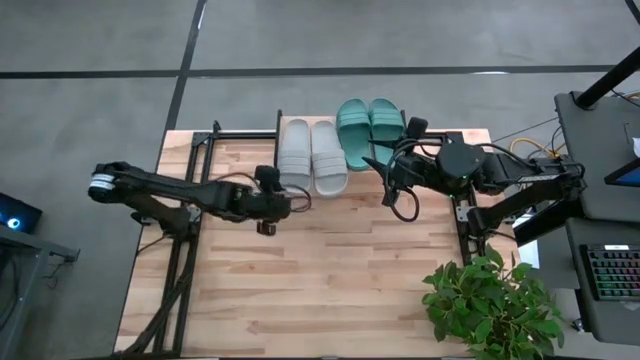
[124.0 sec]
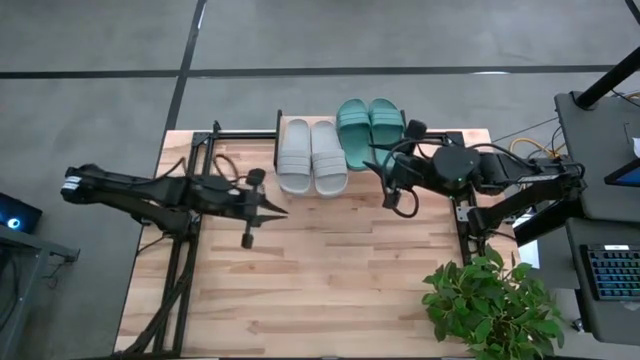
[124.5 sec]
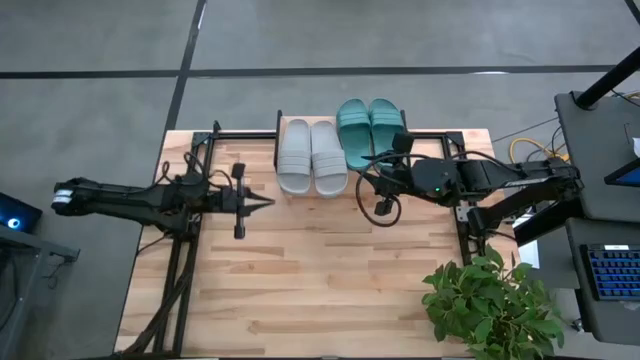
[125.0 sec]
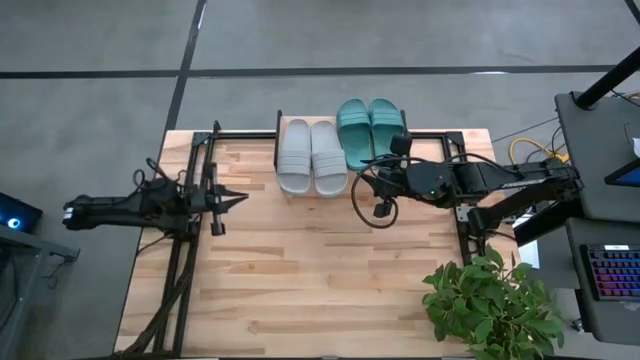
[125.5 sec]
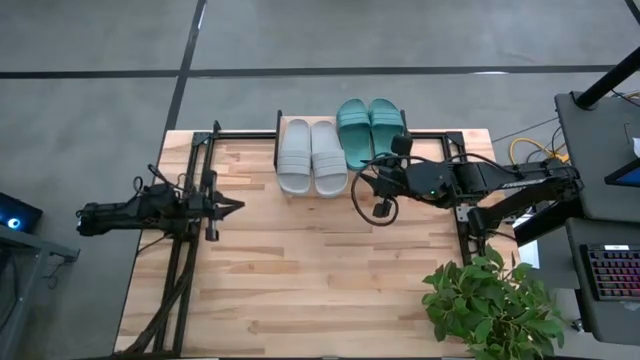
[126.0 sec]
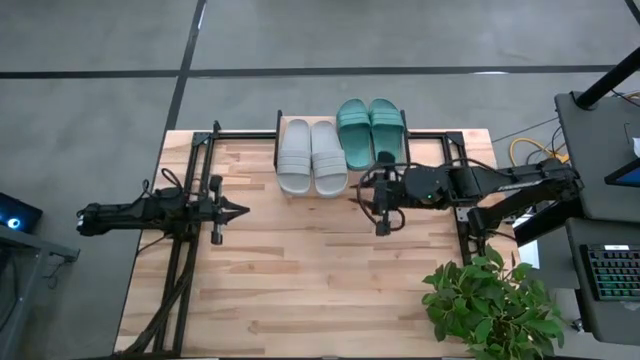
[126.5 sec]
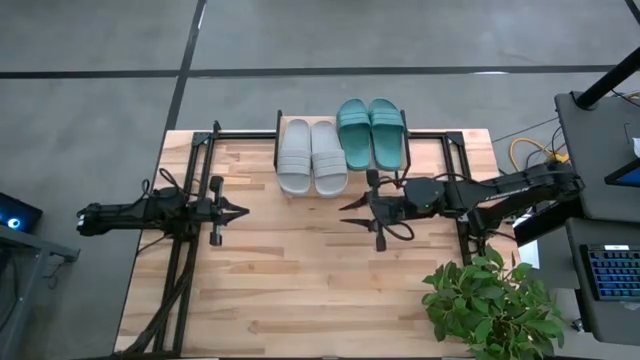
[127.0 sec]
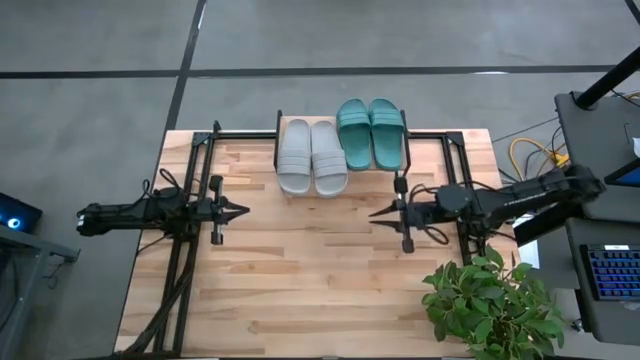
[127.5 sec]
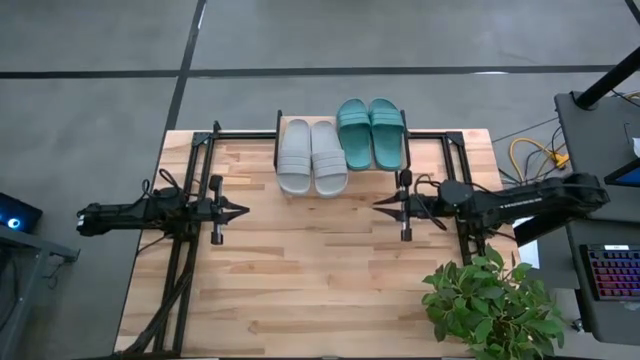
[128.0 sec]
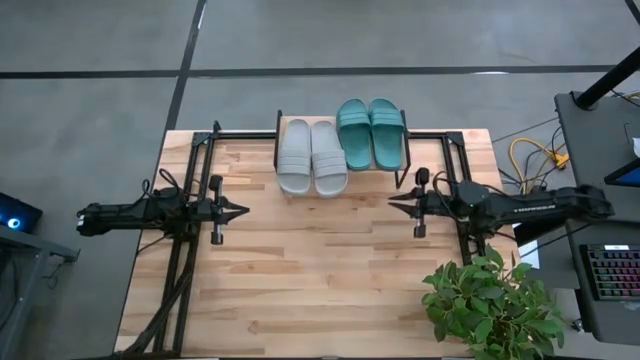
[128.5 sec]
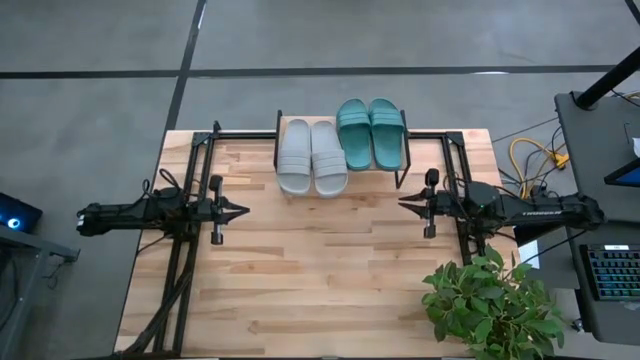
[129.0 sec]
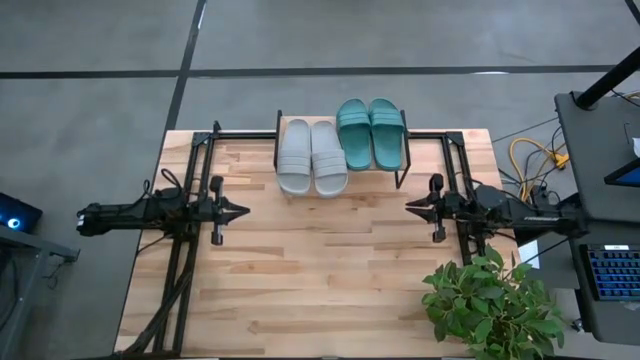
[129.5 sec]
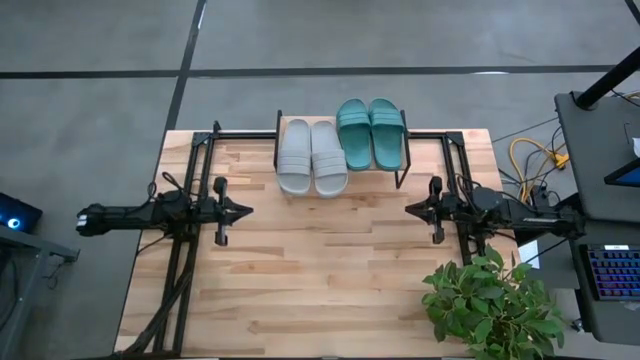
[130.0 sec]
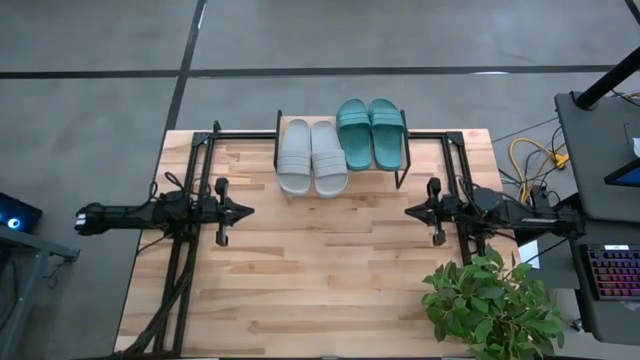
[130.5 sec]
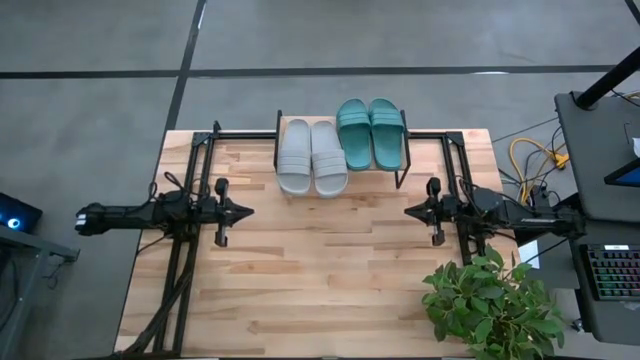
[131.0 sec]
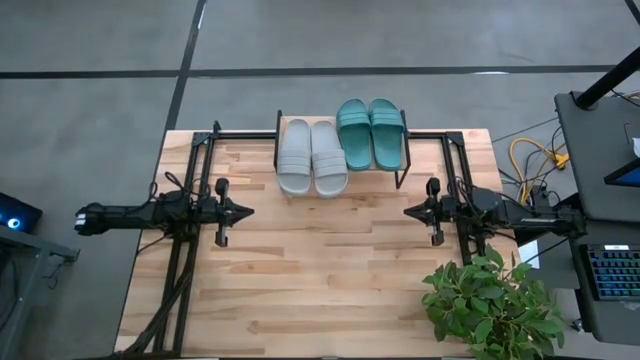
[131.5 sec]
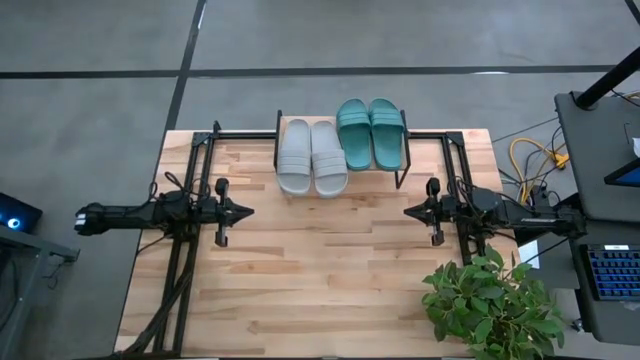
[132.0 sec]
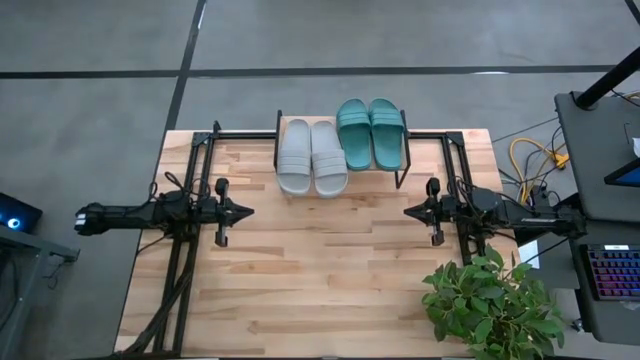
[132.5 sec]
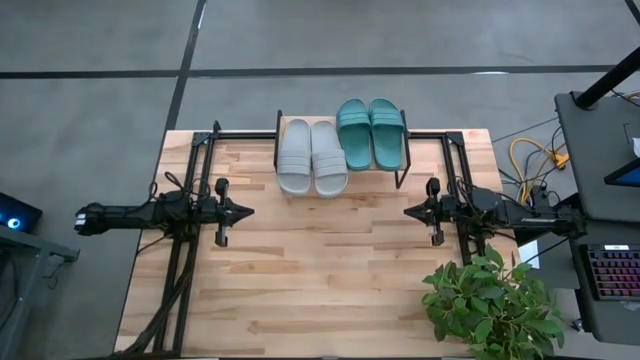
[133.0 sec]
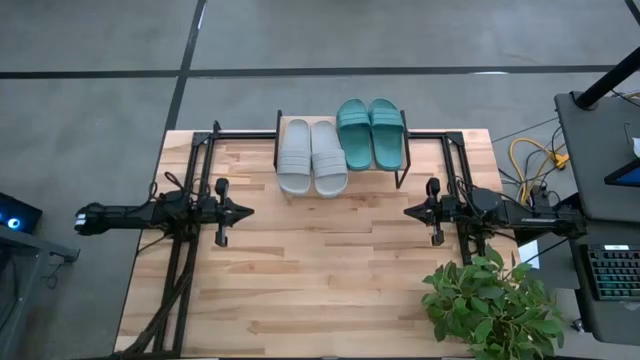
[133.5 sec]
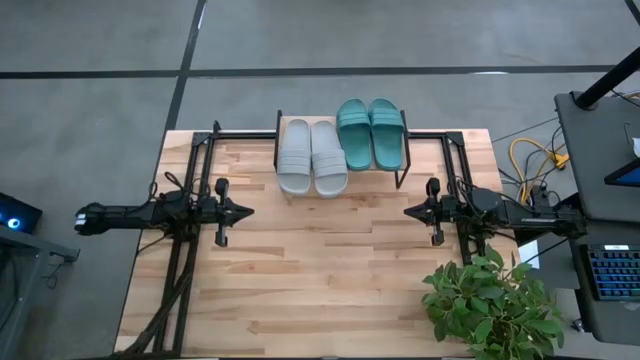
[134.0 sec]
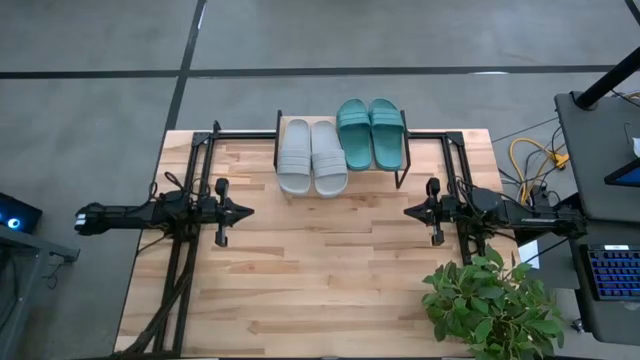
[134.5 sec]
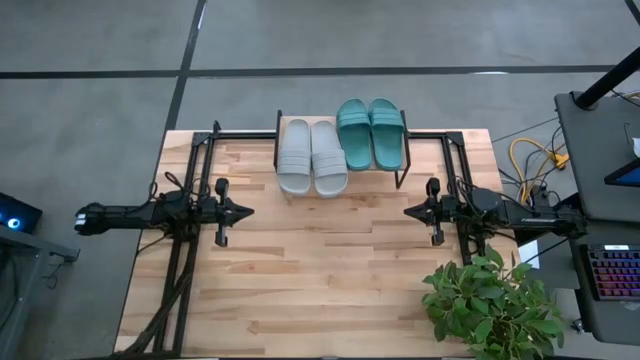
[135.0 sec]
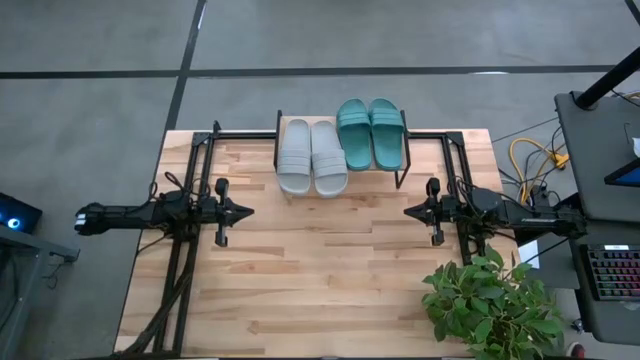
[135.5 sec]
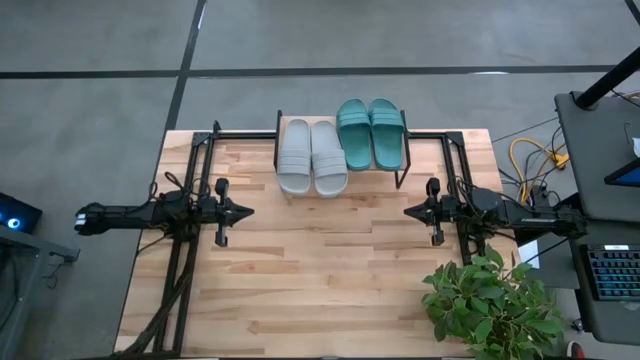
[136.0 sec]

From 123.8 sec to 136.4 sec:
Task: Pick and place slides into the shelf
Return to Home Position

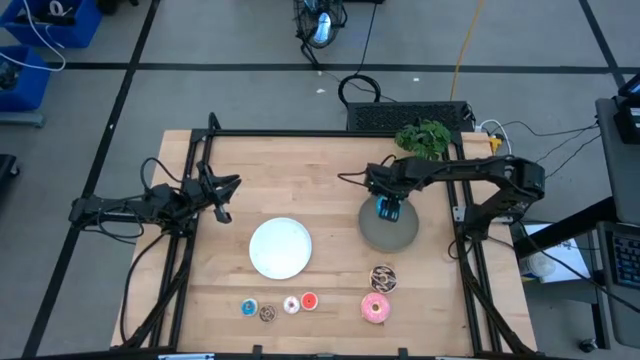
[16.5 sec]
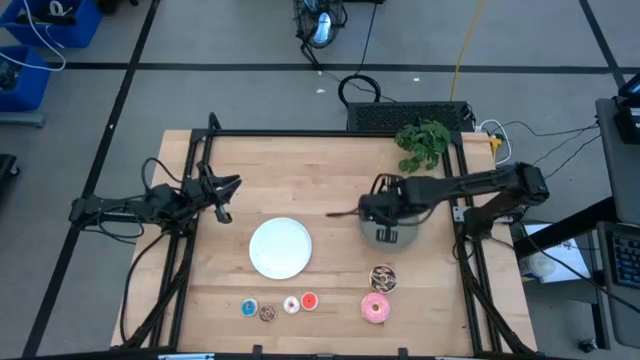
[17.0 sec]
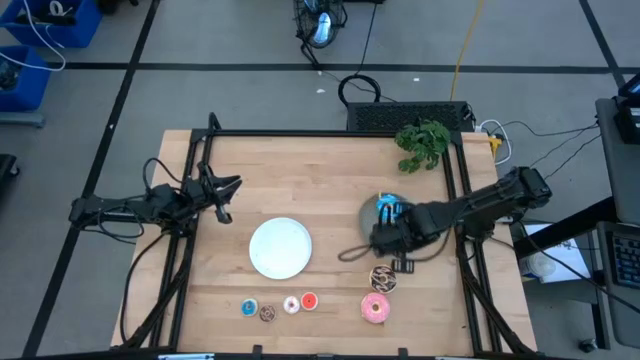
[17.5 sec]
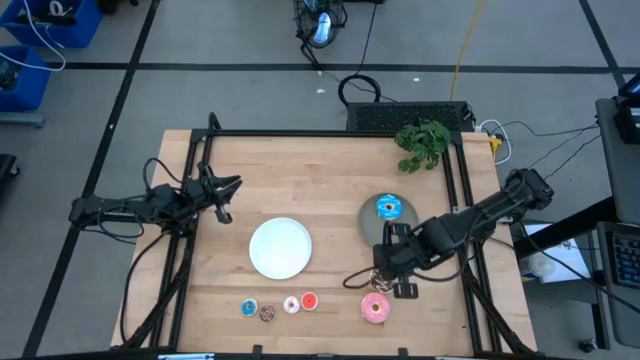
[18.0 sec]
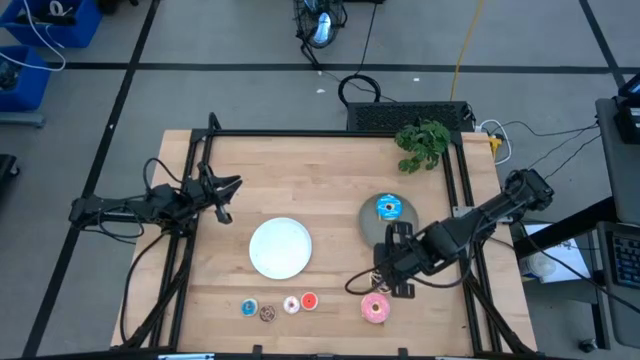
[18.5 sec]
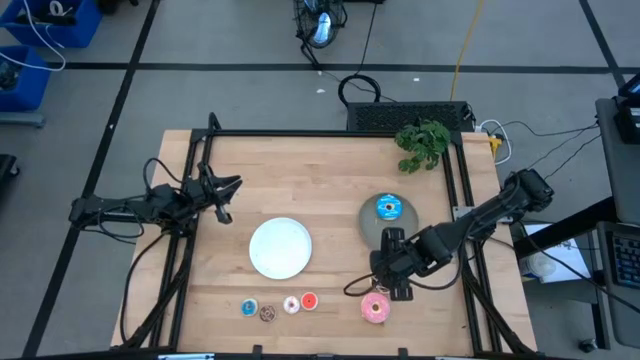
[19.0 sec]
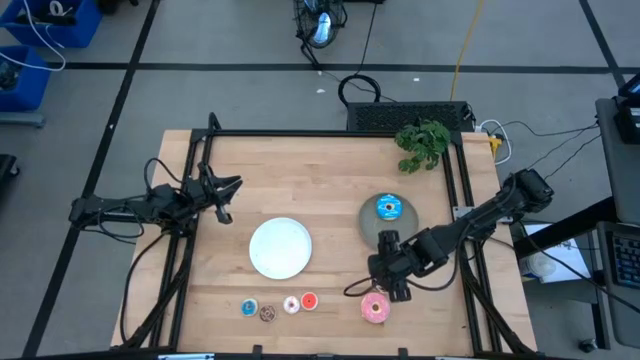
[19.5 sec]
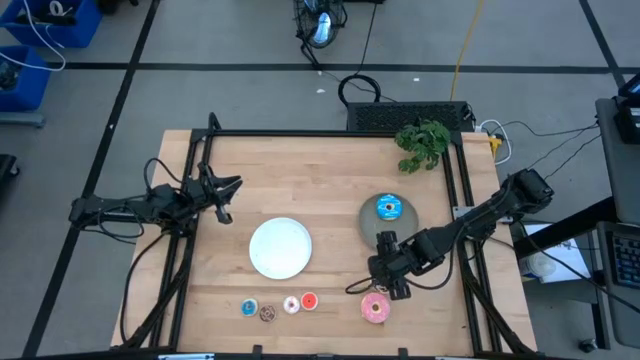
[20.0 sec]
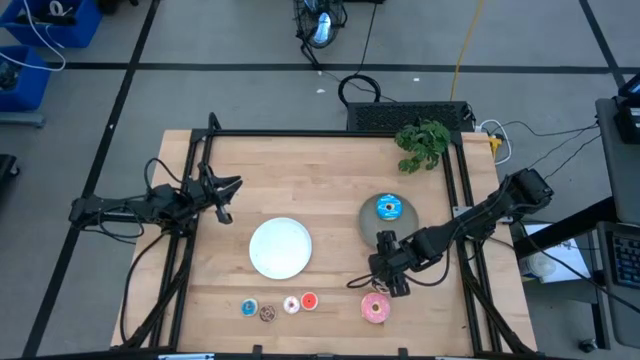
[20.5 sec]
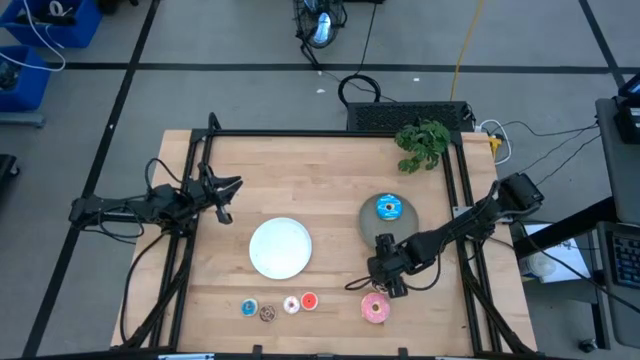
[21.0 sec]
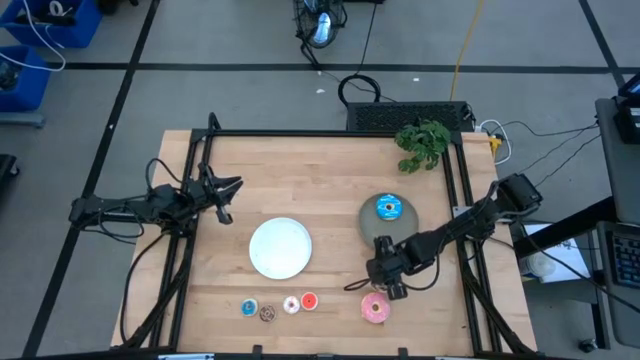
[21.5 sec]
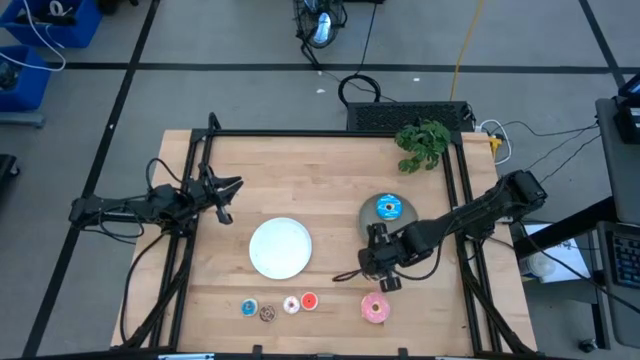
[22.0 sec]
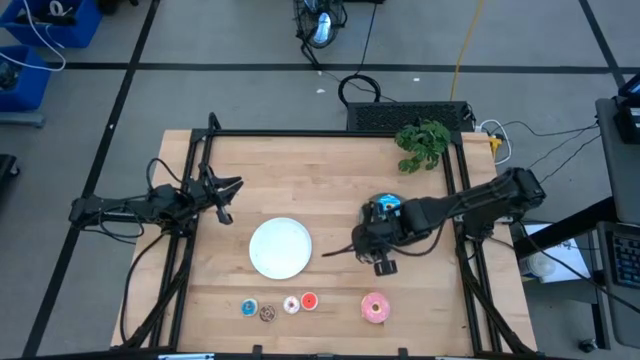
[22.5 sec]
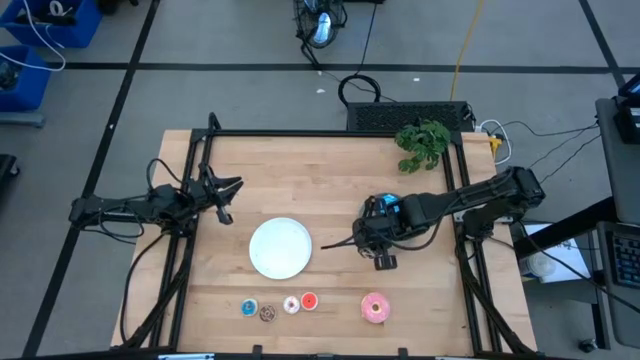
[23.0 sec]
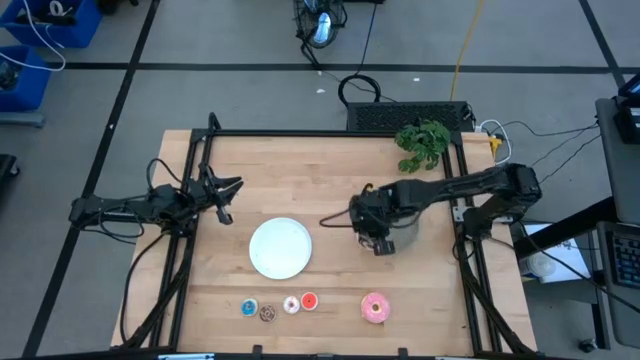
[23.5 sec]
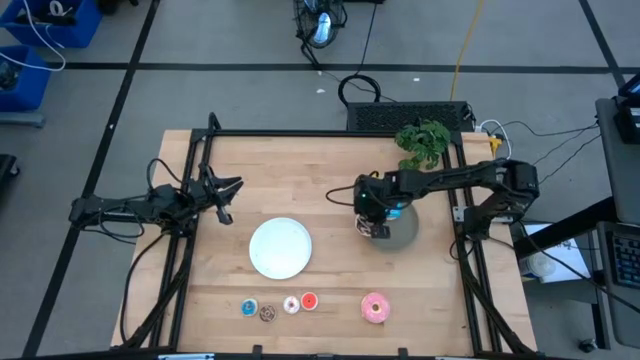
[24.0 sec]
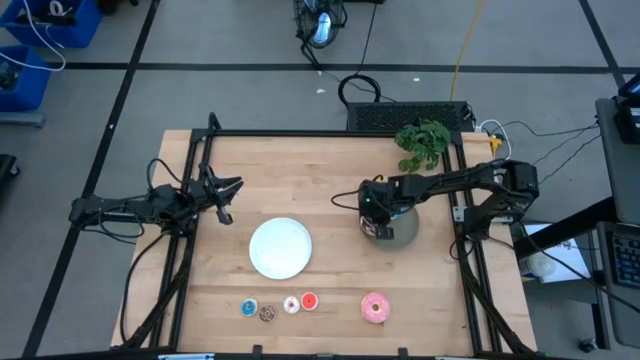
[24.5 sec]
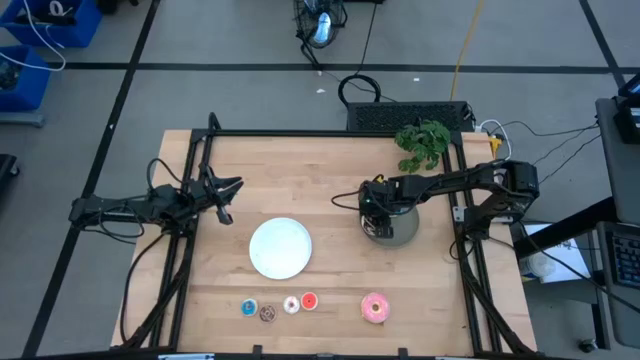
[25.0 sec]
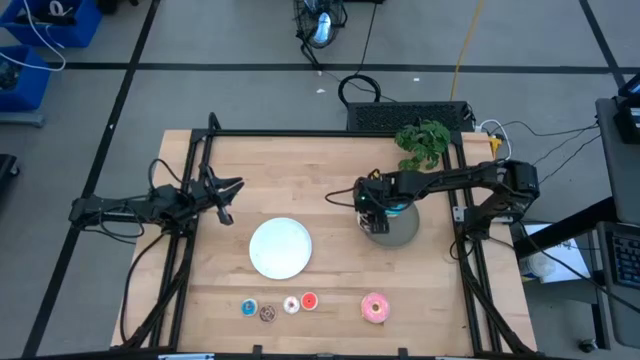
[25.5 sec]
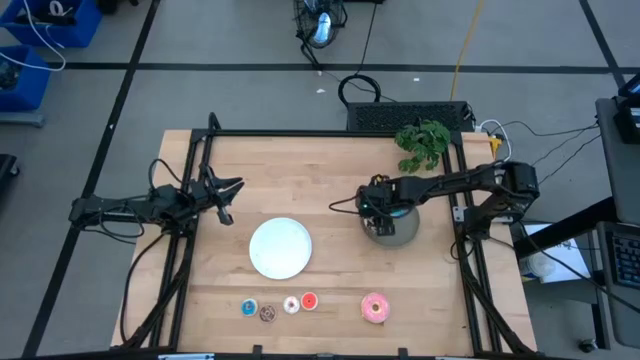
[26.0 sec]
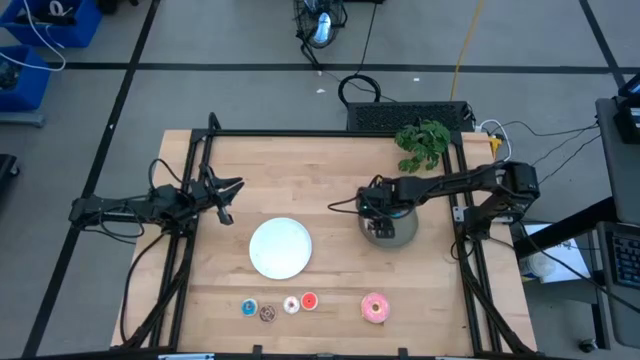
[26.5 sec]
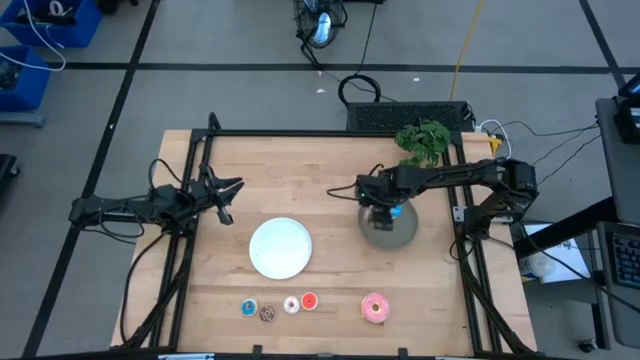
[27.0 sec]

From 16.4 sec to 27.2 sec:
Task: Pick & Place donuts
Put the large black donut on the gray plate
